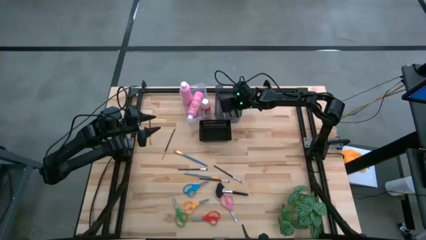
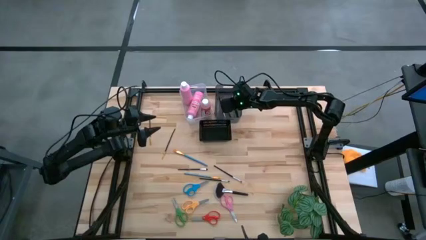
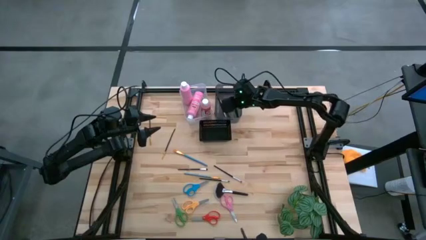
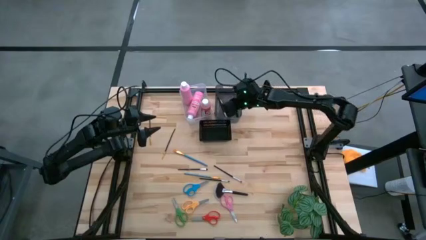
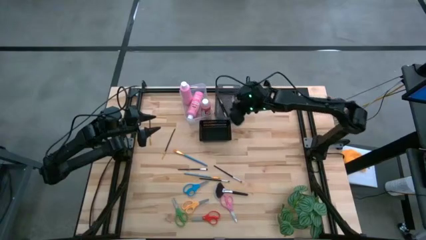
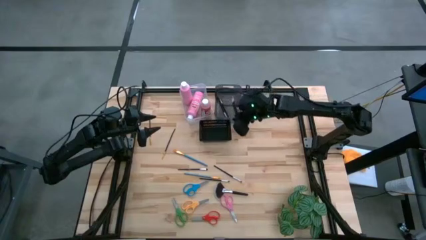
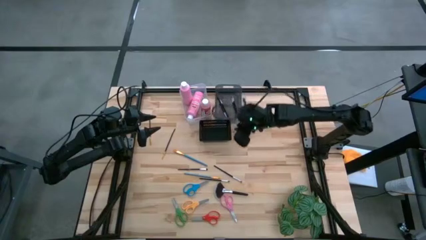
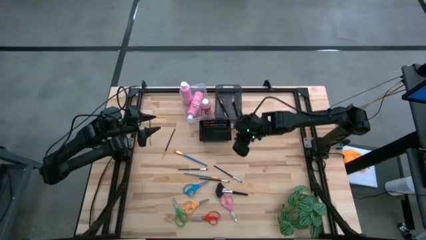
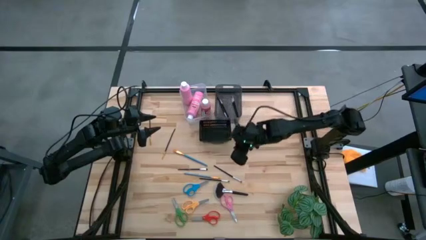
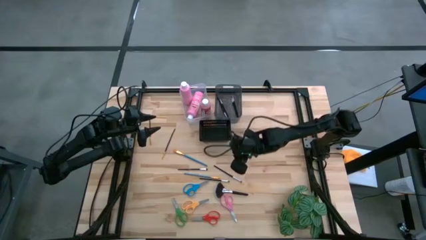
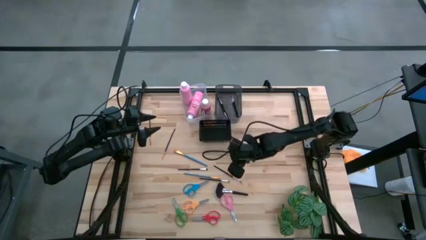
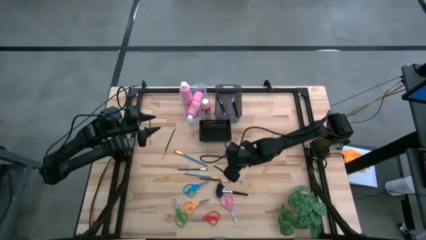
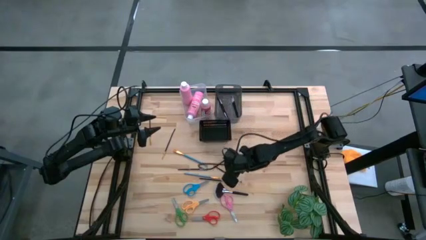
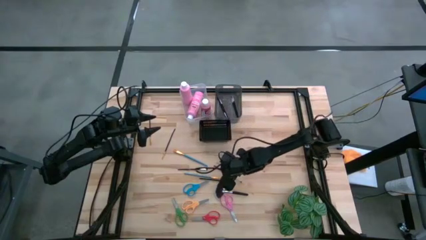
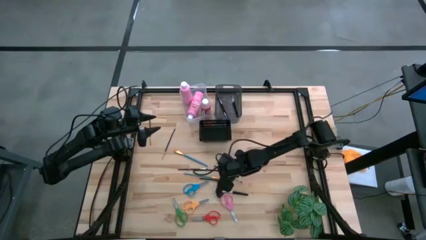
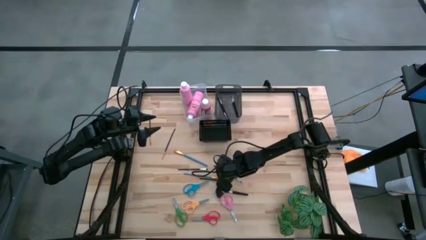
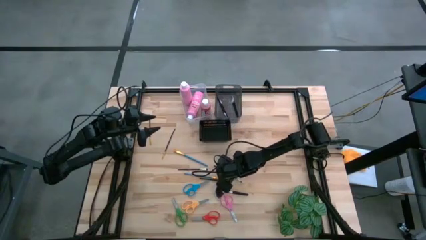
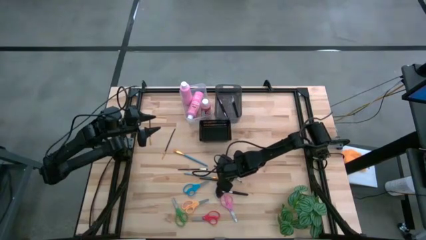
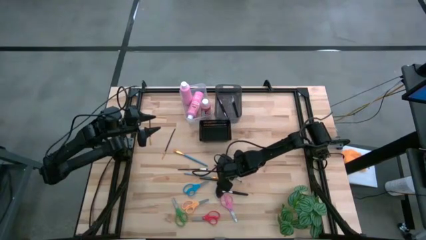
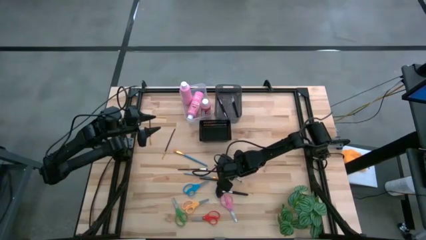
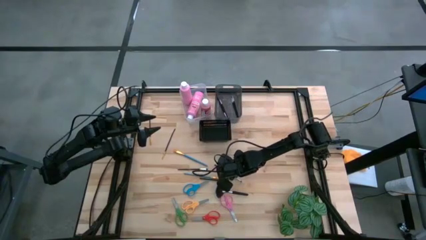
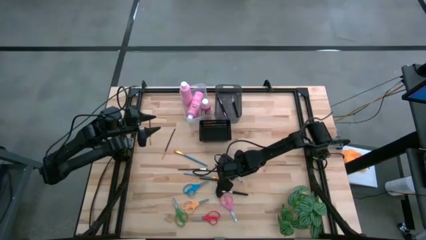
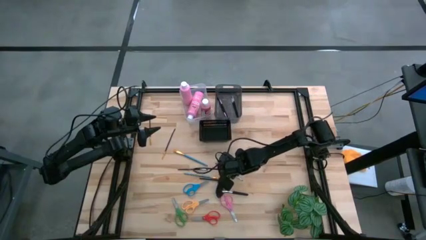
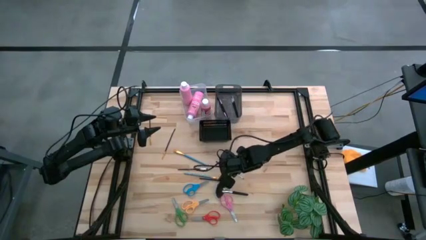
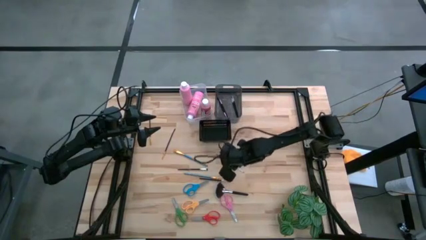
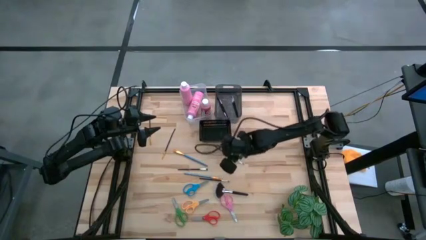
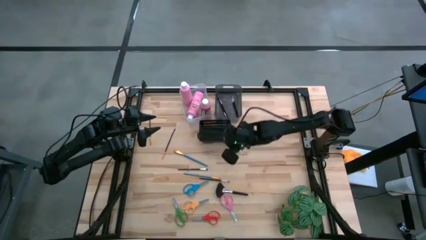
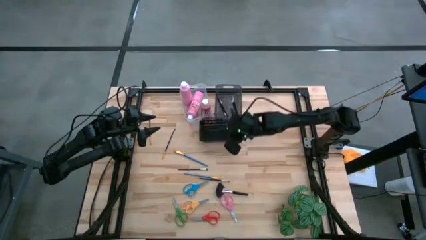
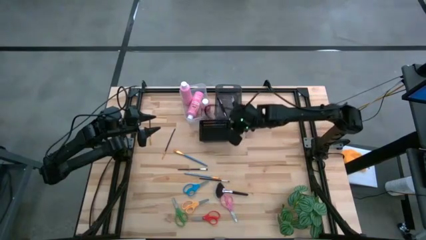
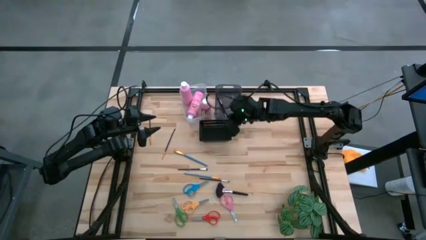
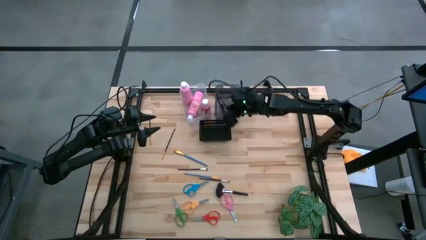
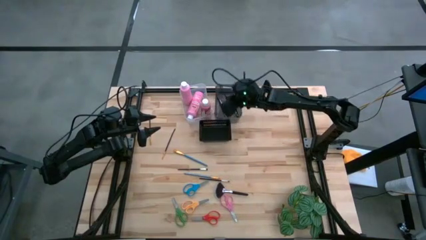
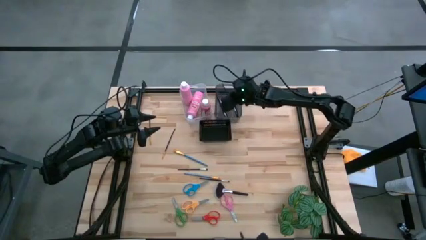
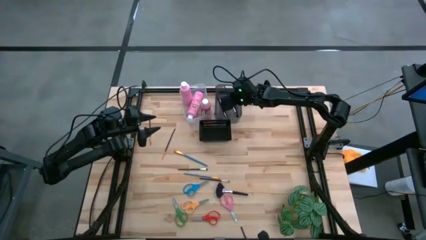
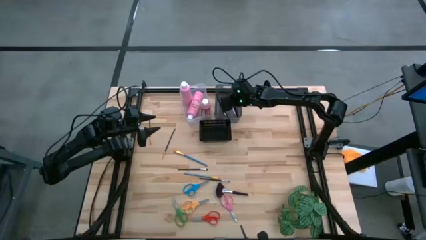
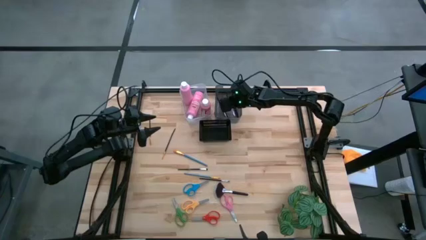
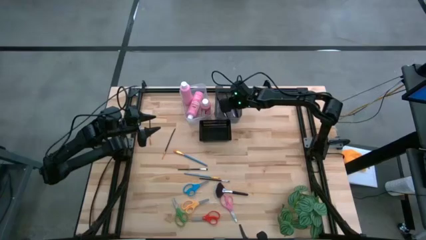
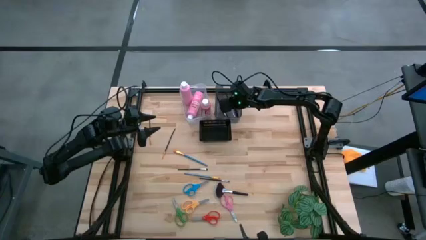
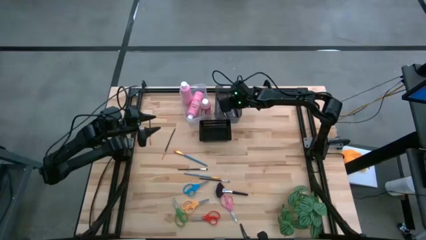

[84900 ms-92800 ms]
Task: Pick & Place Paint Supplies
Put the black paint brush into the gray bin

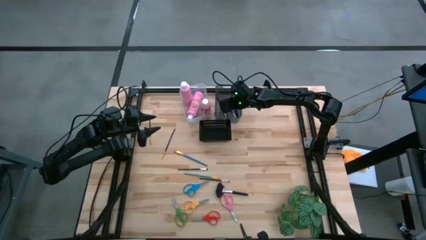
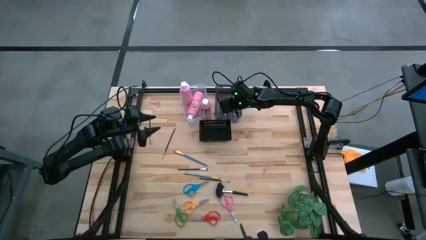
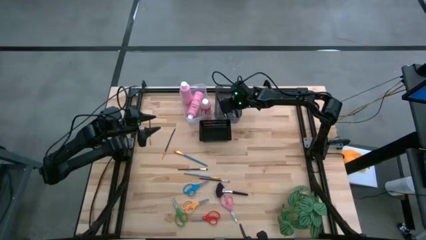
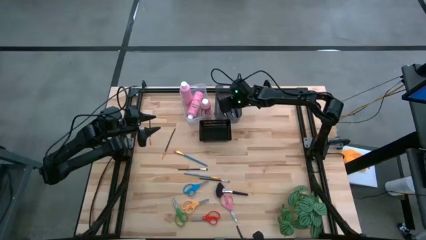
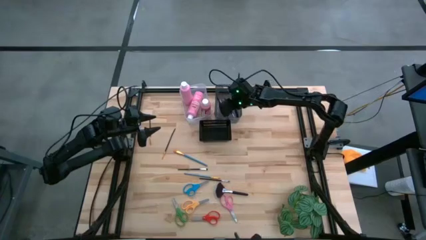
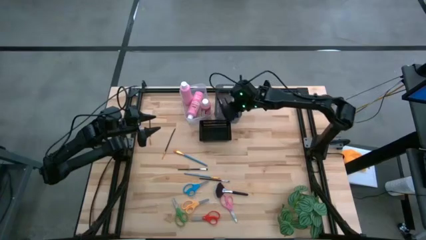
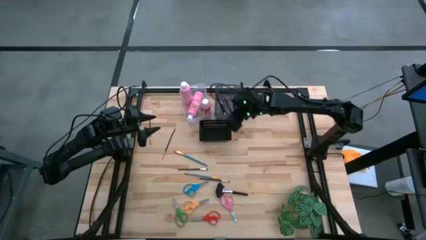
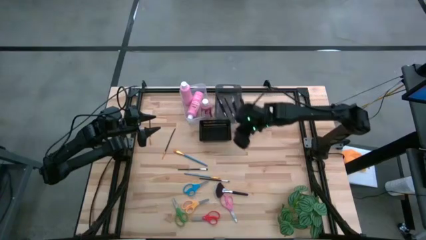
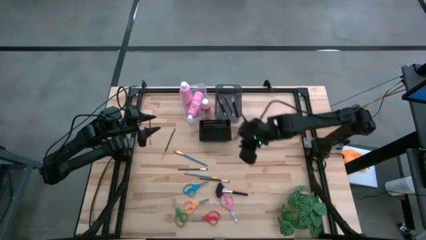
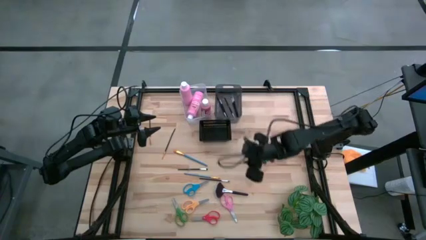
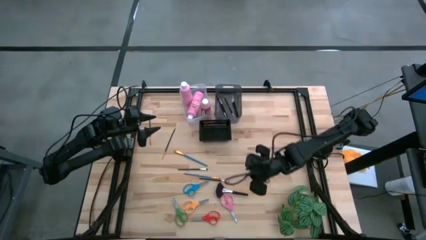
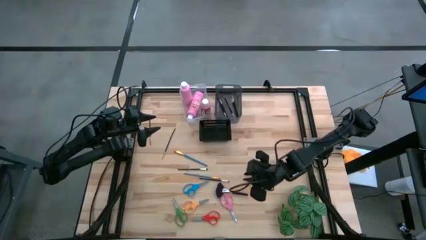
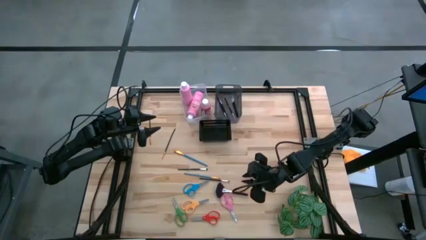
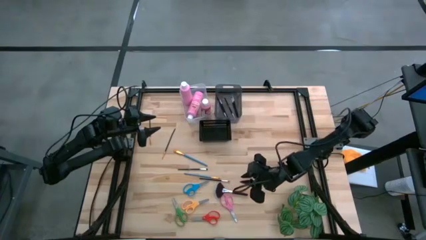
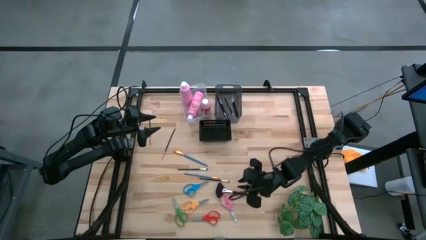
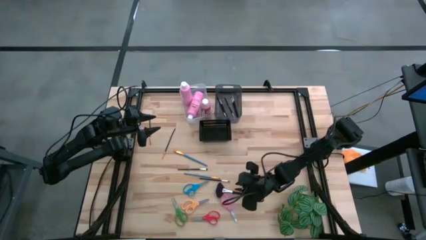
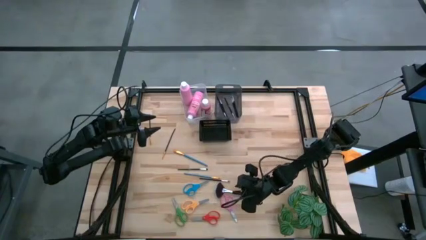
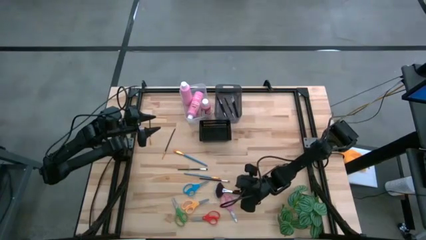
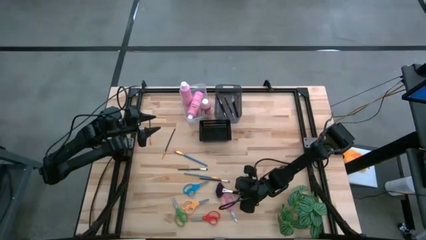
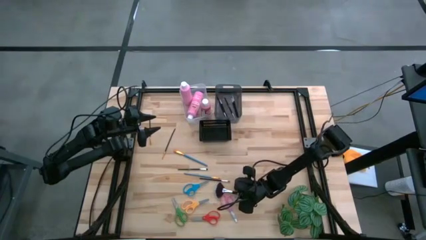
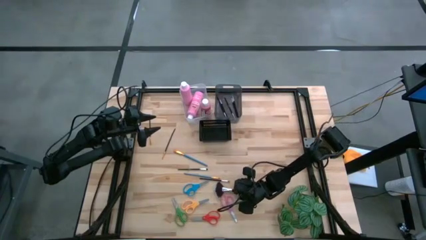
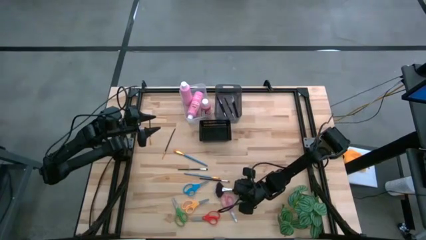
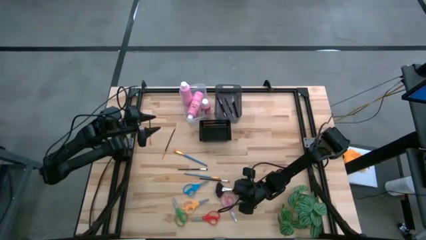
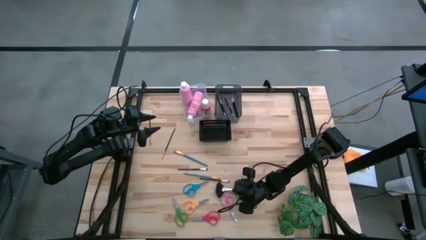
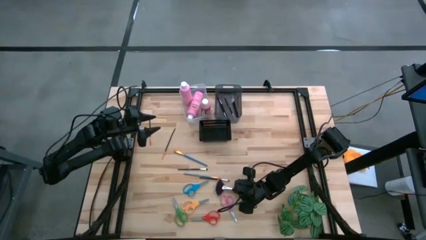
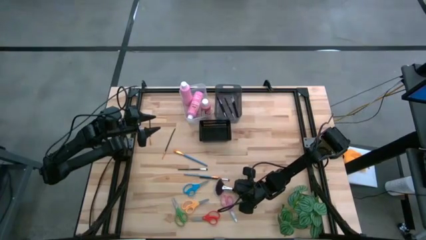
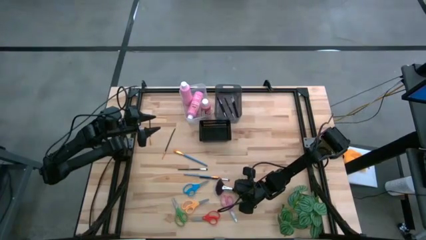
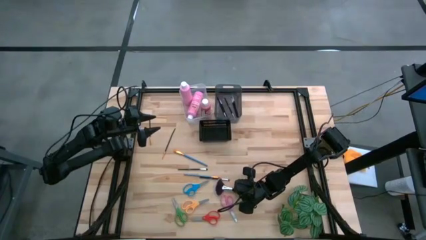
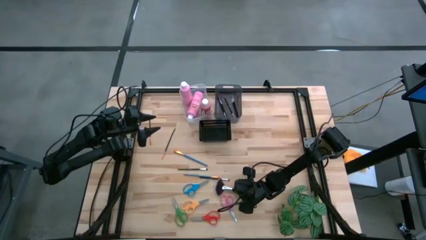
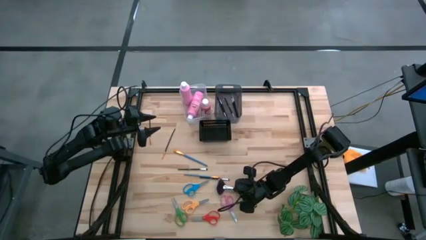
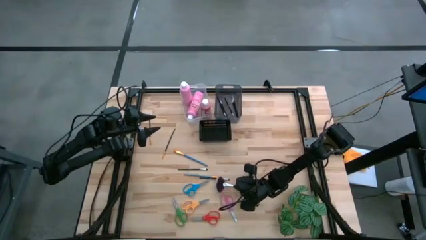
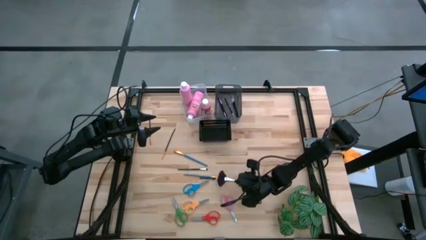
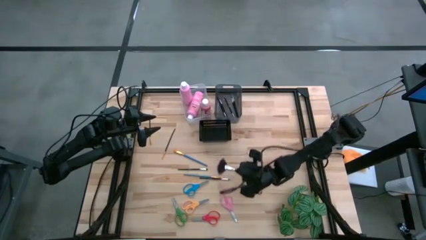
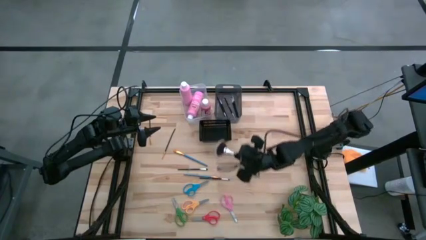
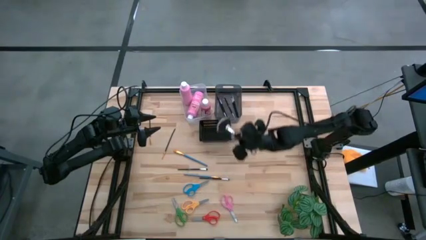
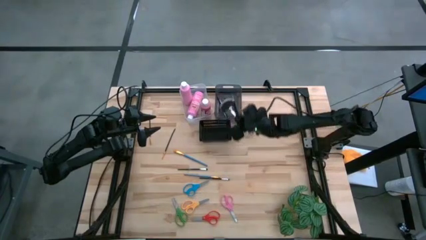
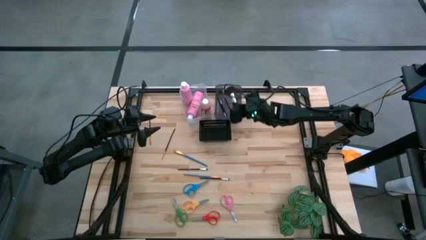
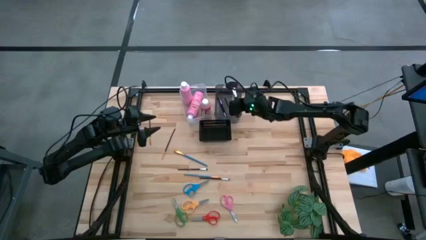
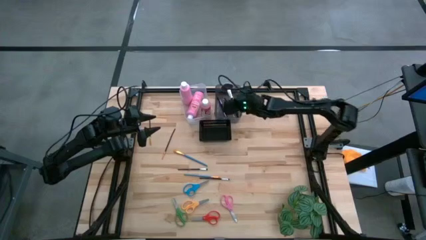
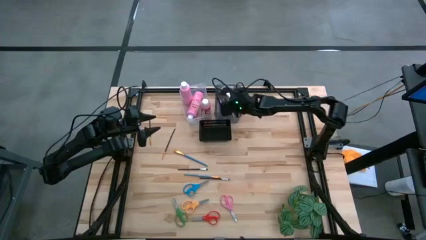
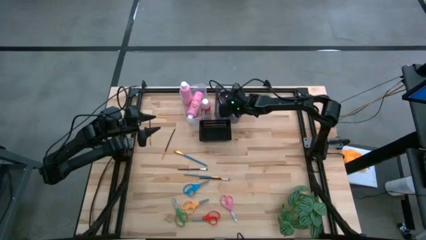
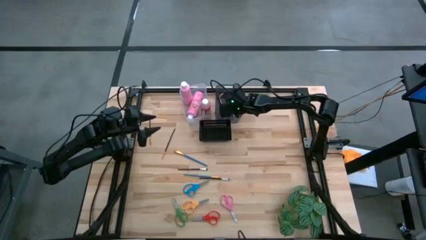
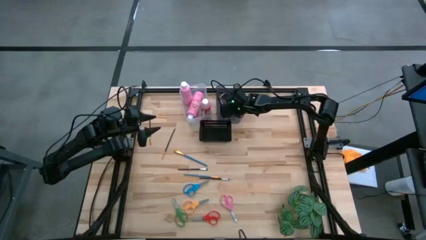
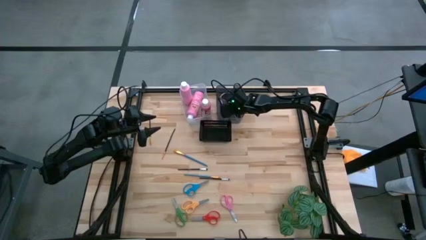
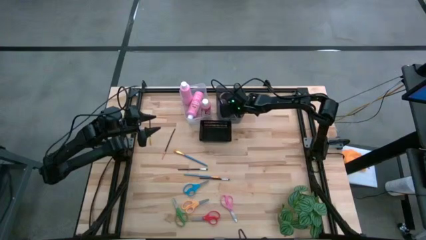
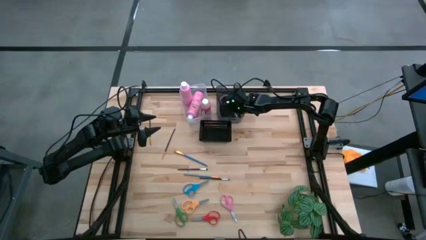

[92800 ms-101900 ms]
Put the black paint brush into the gray bin
